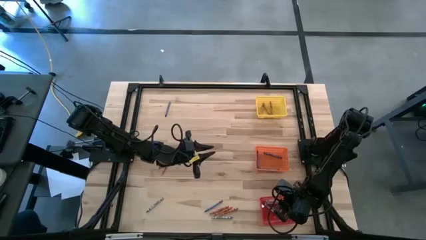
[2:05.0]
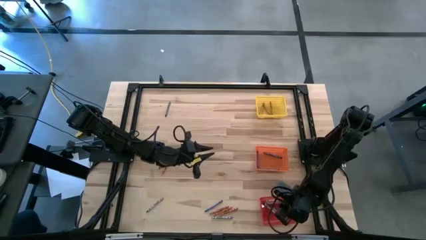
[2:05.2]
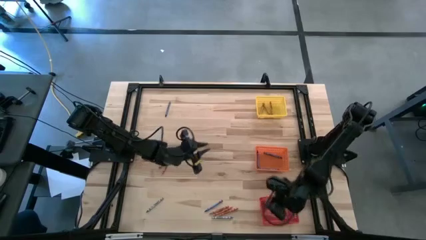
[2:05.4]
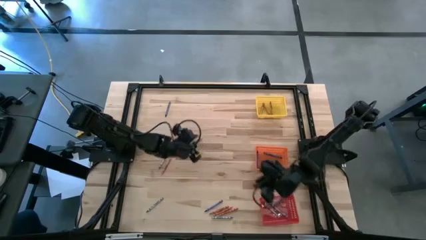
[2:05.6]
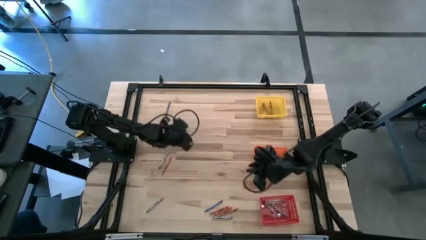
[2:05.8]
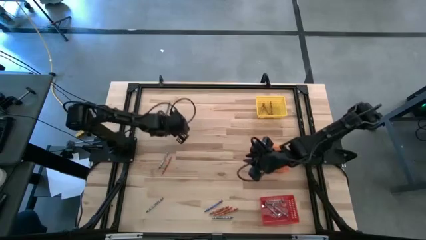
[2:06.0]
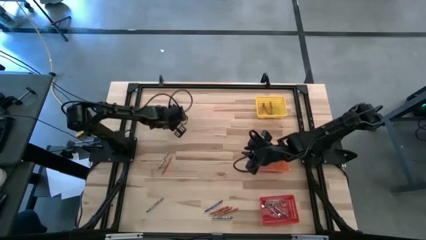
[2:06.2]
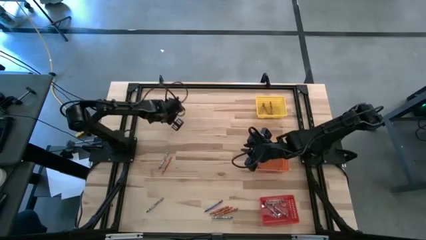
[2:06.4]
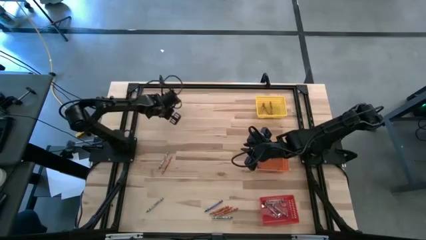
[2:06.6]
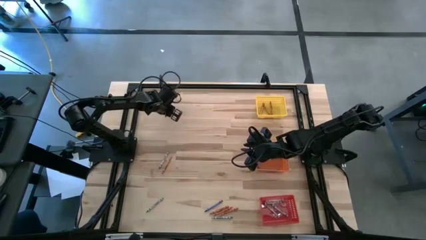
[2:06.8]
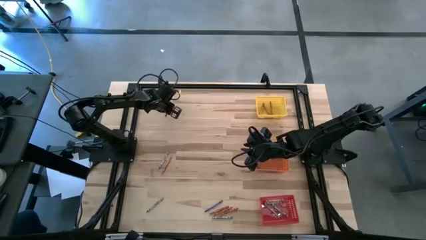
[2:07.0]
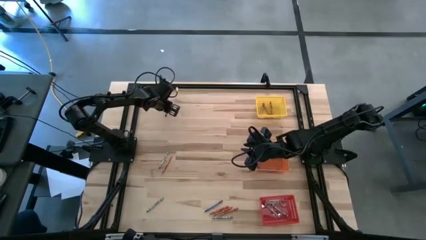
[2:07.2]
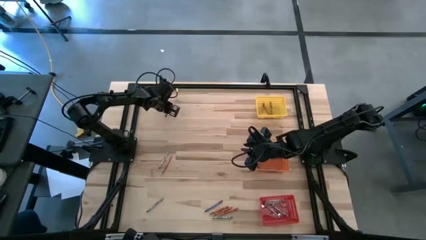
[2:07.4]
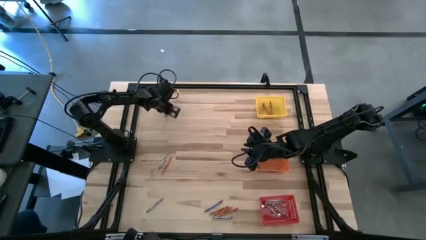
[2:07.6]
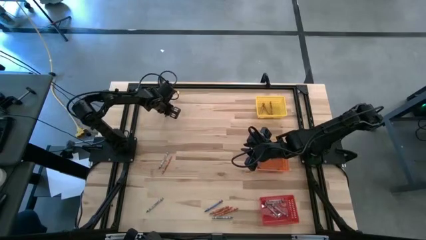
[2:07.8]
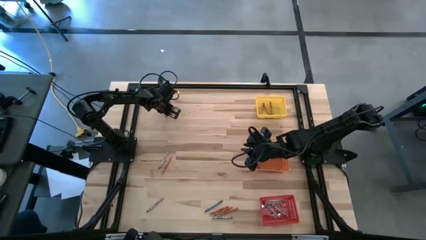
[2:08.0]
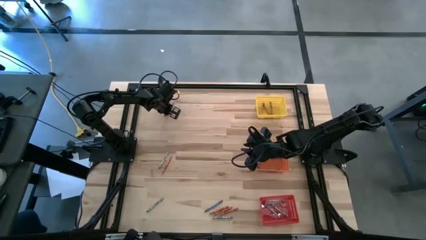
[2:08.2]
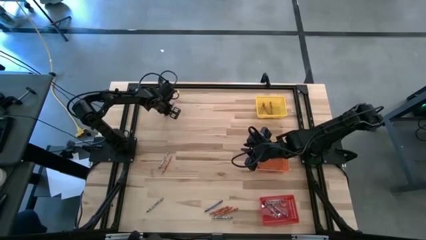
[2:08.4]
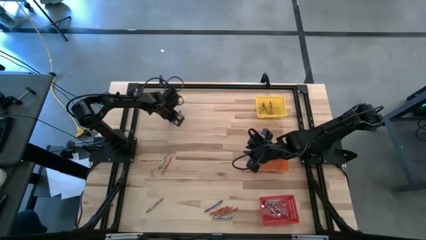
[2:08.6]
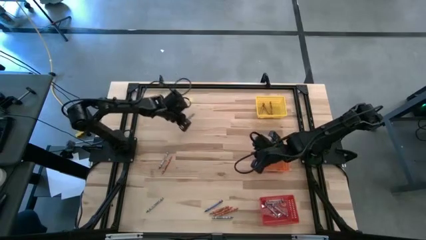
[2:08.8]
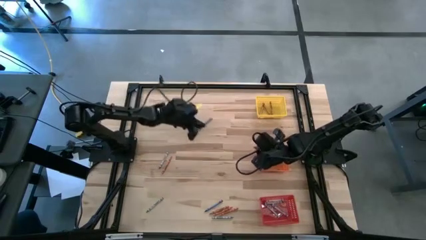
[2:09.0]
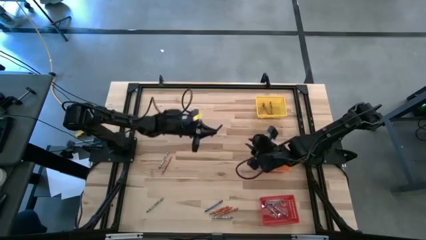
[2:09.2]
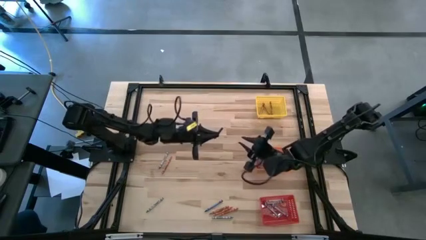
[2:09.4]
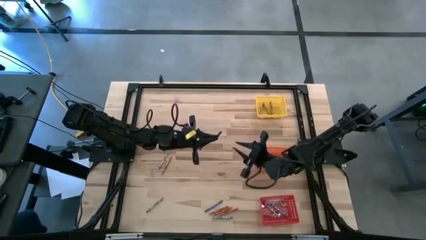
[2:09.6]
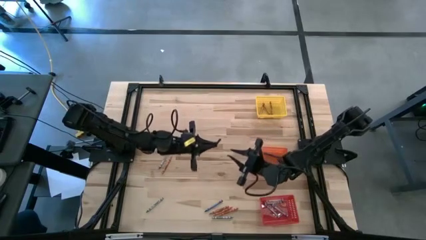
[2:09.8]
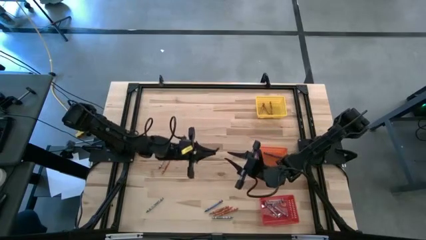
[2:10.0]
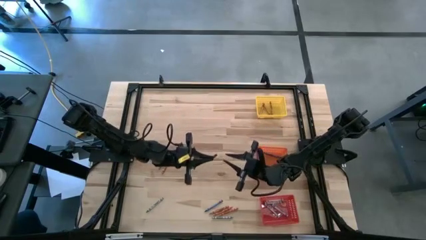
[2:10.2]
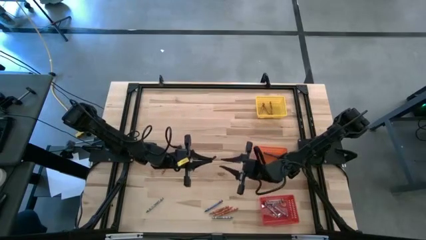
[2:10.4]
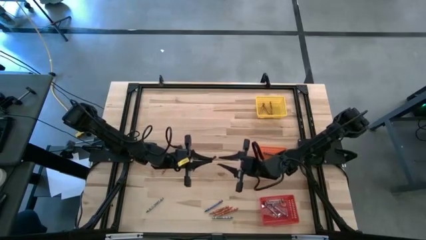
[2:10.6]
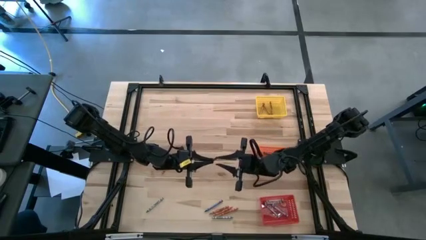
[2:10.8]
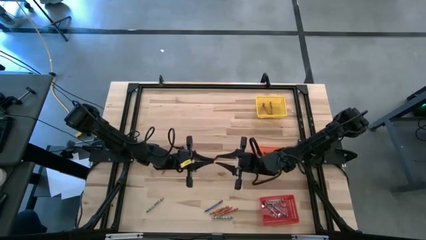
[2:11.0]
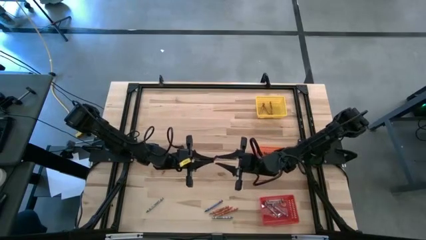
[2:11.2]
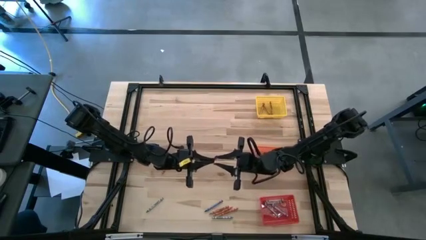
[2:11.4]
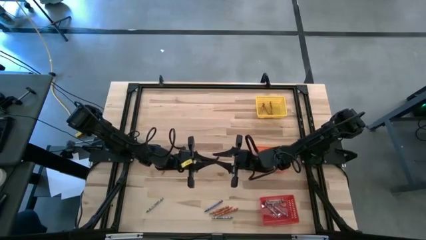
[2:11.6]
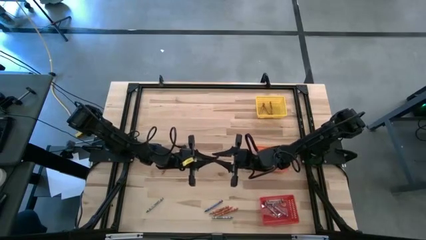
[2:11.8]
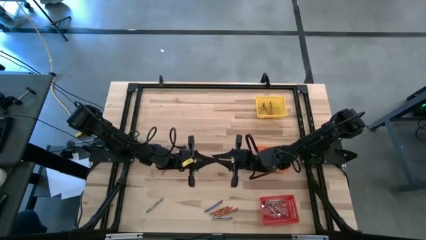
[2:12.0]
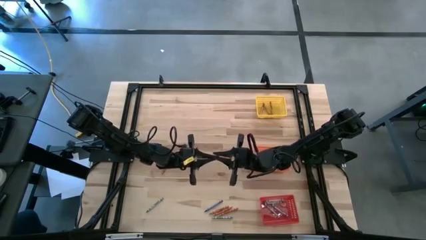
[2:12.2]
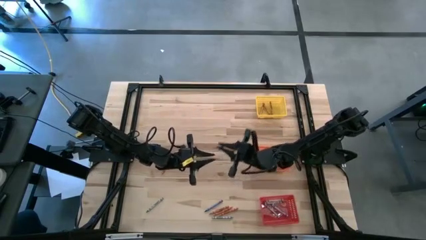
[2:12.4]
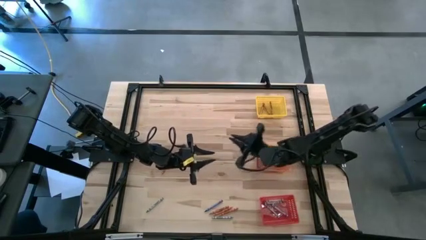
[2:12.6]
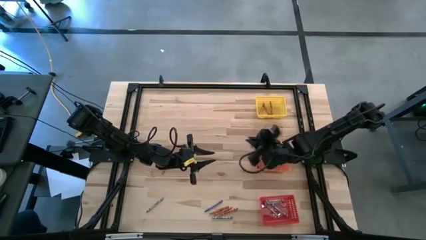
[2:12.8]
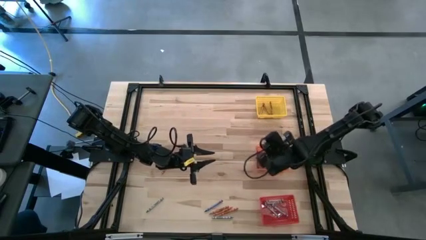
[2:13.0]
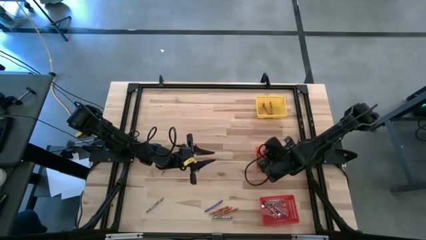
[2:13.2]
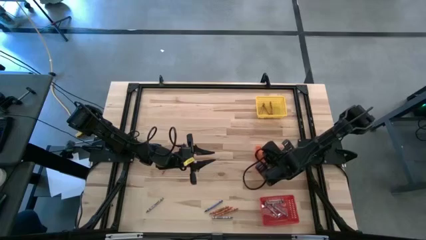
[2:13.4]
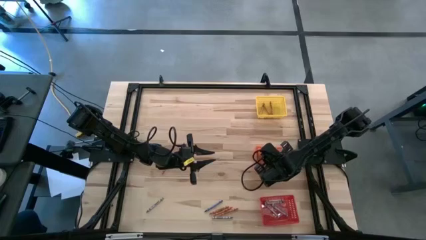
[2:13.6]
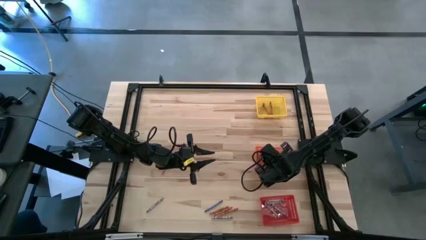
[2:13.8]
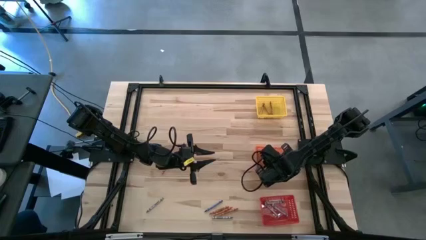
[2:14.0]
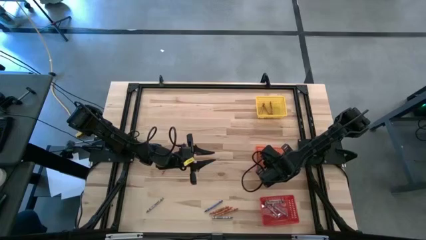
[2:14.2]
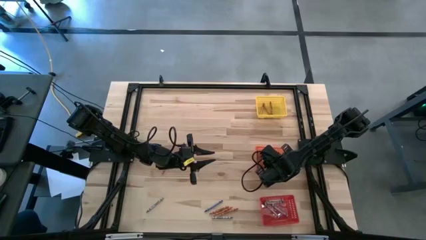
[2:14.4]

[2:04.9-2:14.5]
Task: Sort crayons
Put the blue crayon into the orange bin

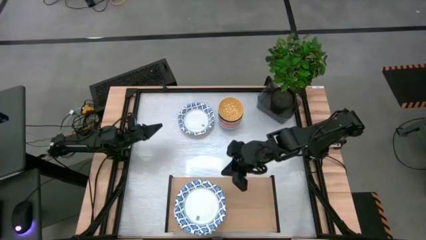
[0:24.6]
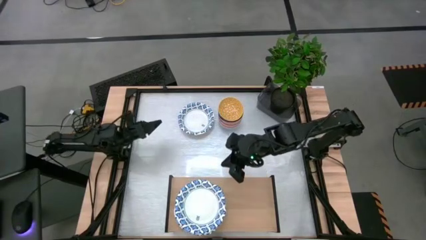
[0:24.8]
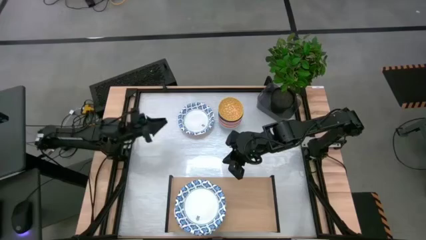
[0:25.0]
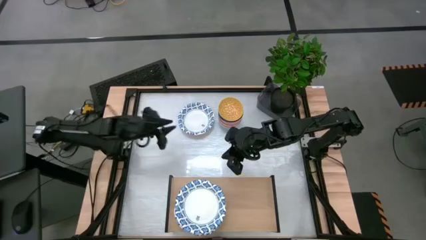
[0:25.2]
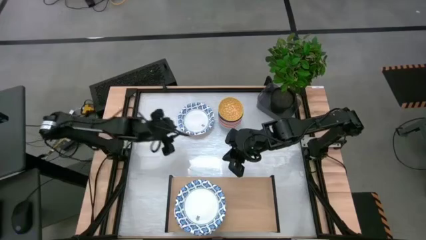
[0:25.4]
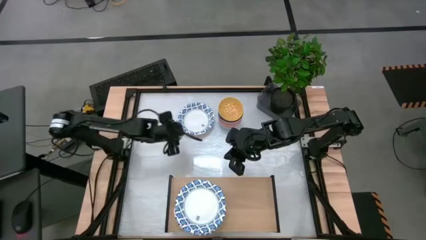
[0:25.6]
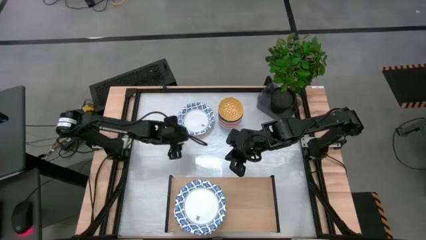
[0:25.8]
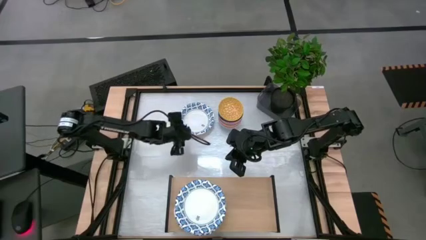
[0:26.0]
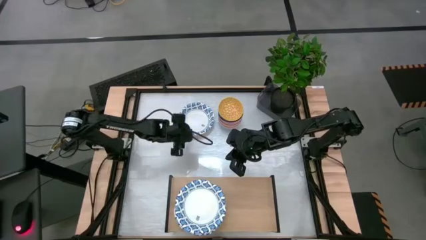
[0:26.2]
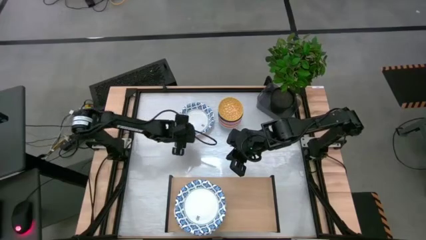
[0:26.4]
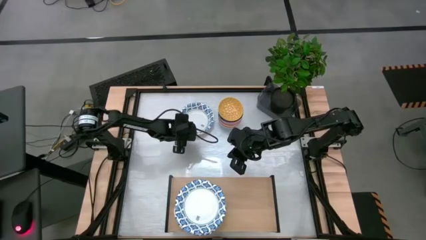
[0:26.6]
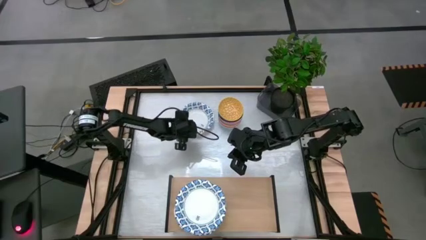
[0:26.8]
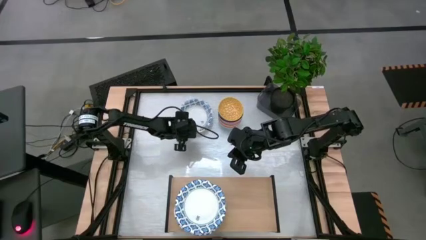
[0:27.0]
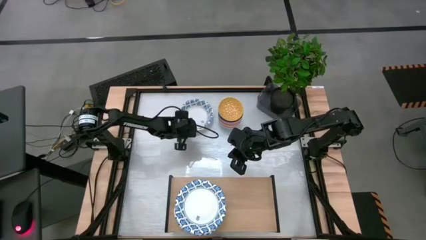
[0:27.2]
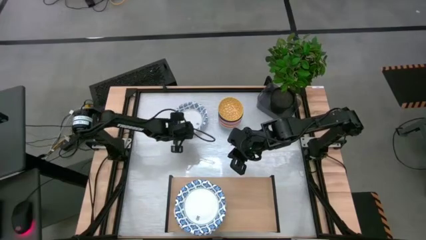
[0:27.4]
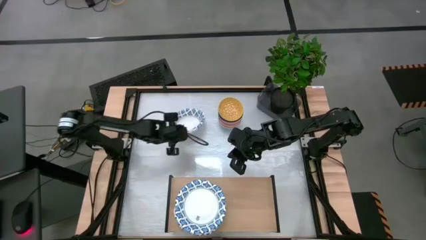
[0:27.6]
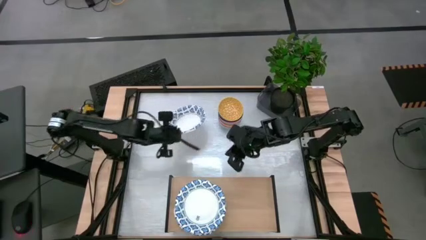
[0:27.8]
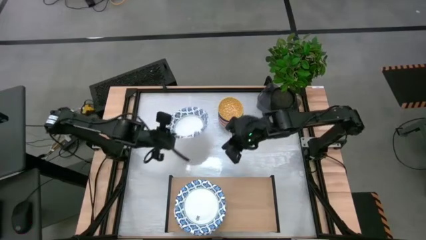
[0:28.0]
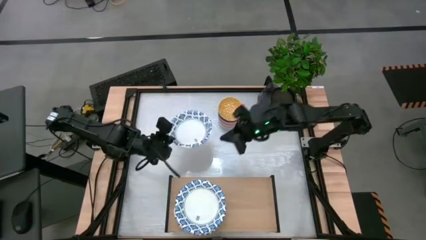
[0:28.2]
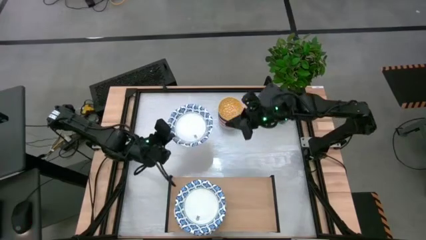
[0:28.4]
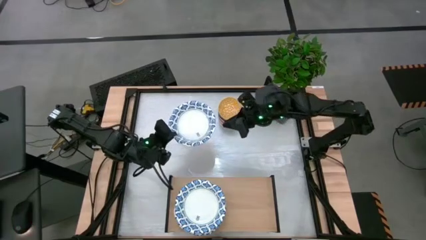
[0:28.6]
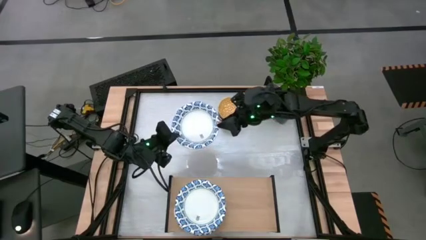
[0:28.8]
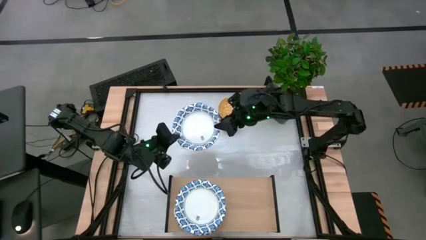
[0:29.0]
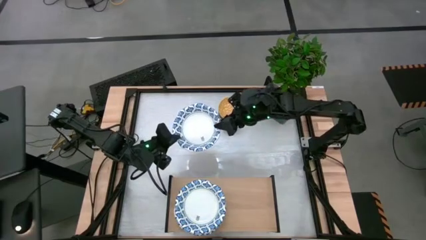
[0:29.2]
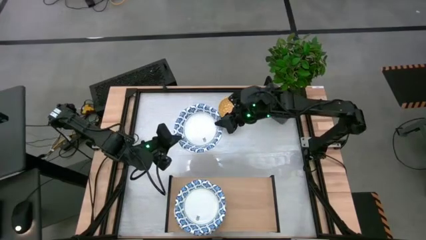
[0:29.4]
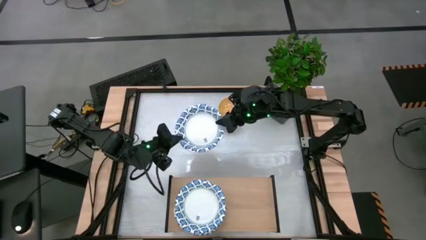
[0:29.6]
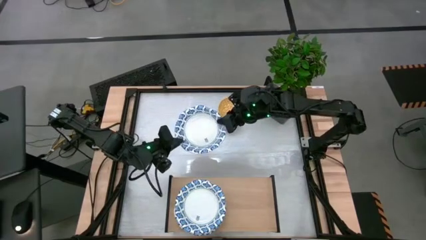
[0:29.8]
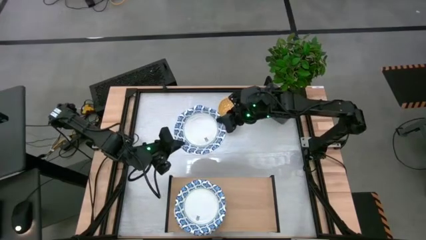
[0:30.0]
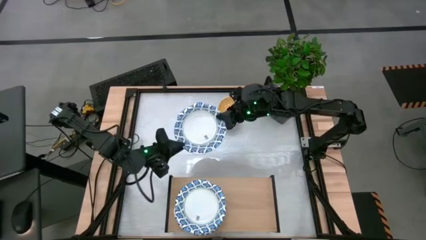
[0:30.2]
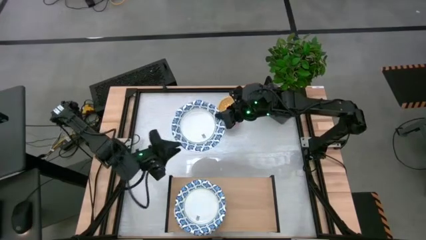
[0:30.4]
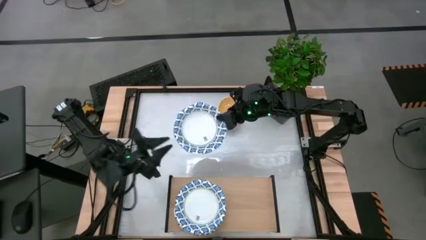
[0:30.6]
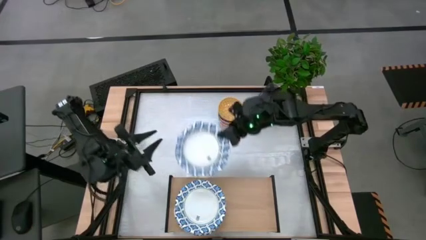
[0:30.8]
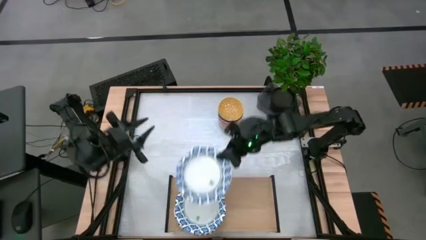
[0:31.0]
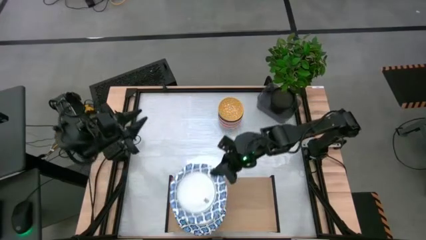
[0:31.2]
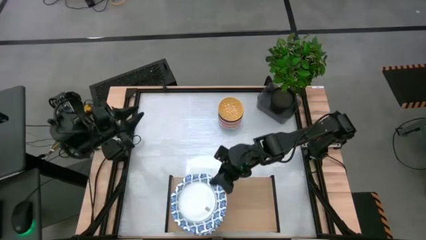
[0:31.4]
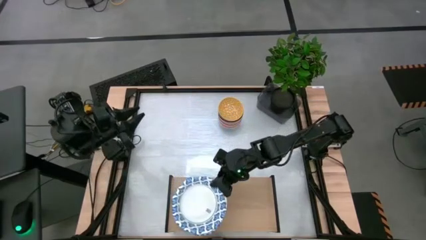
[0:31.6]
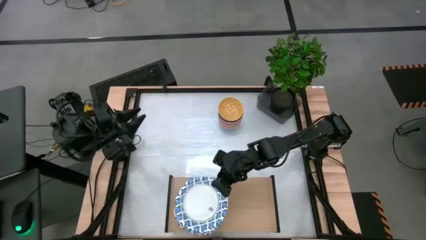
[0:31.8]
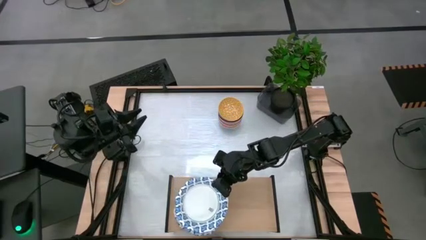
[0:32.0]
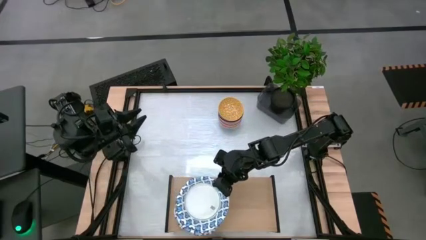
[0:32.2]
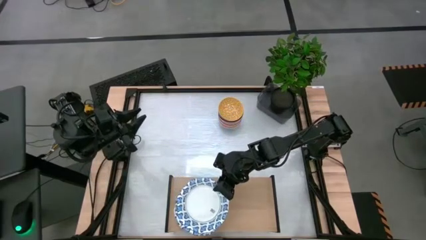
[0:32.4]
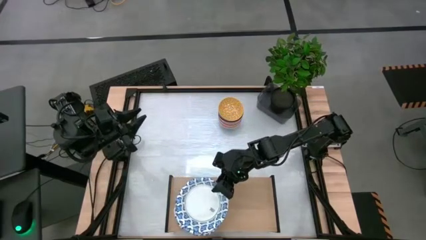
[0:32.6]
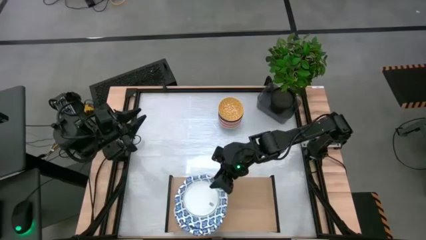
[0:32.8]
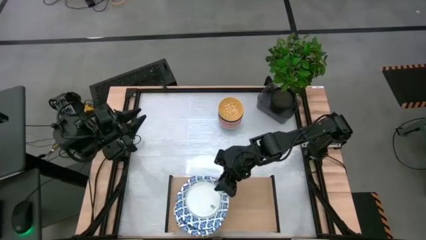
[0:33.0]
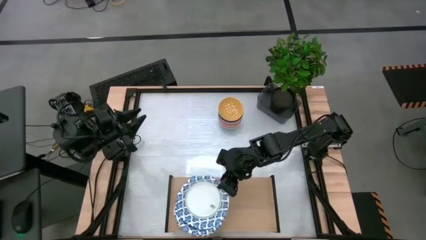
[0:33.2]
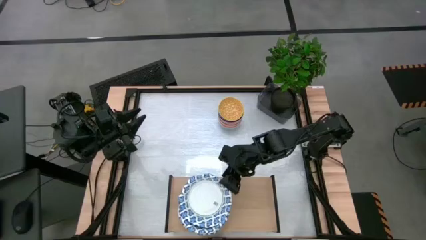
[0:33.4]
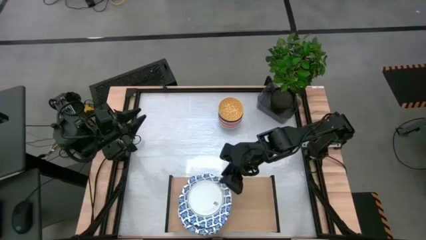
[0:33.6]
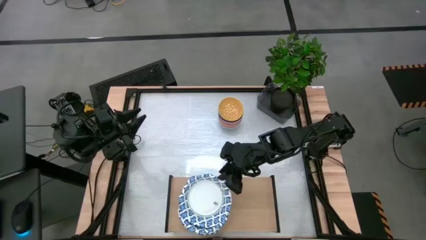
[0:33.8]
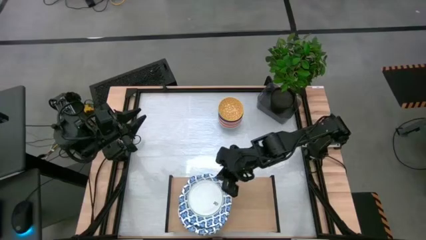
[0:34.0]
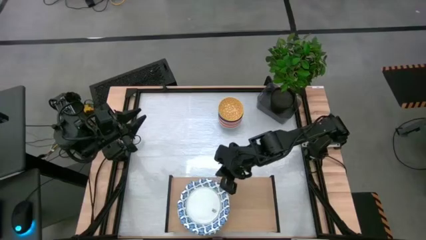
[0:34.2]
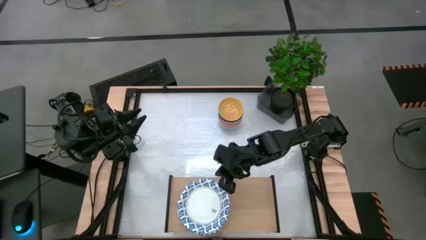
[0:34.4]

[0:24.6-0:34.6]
Task: Place and stack plates onto a shelf
Stack the white plate on top of the white plate on the shelf
